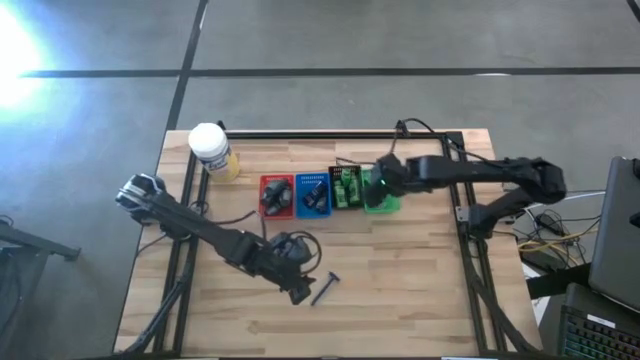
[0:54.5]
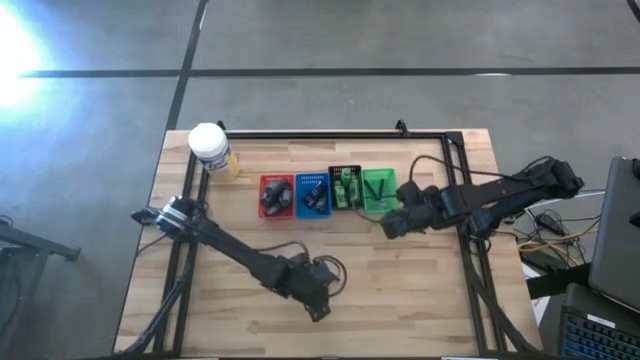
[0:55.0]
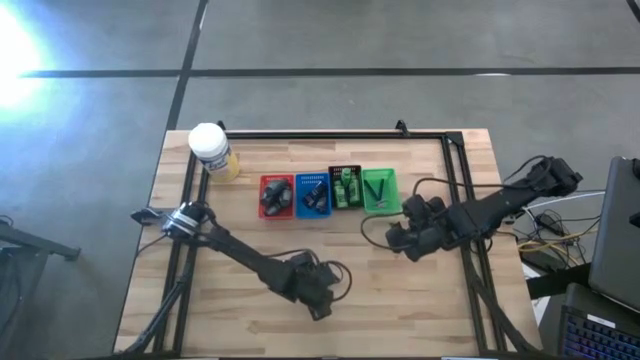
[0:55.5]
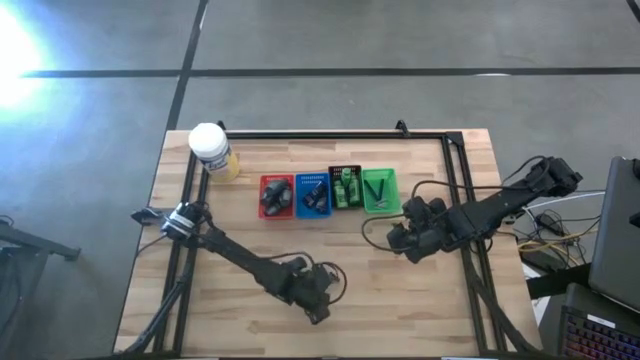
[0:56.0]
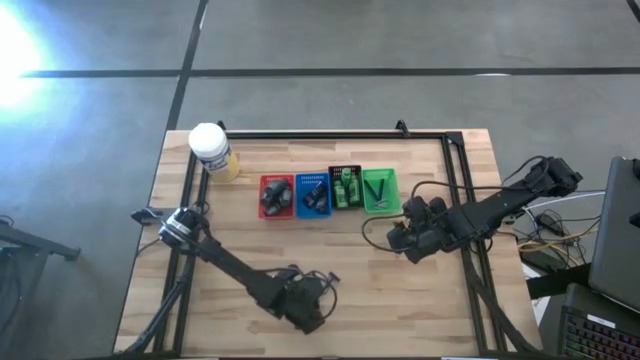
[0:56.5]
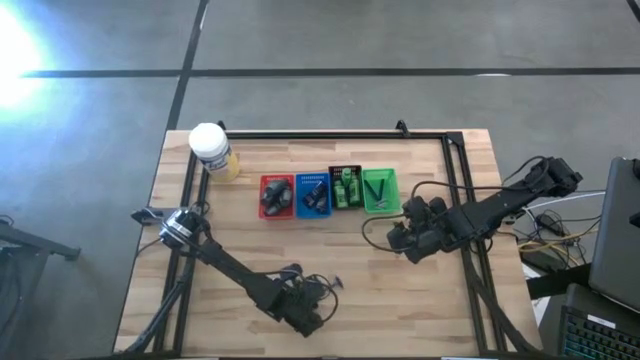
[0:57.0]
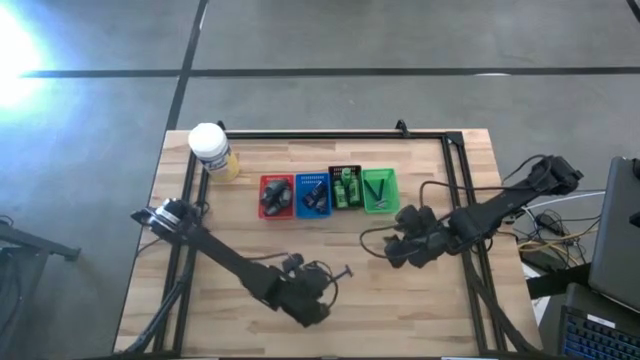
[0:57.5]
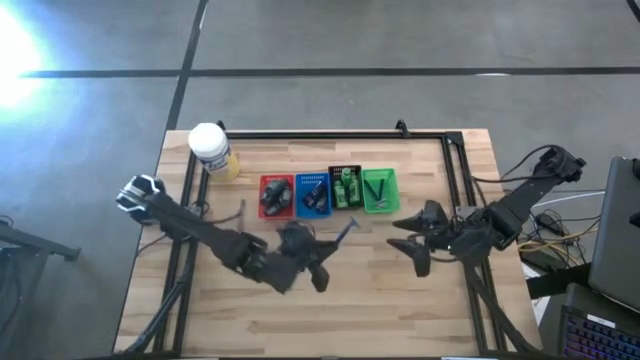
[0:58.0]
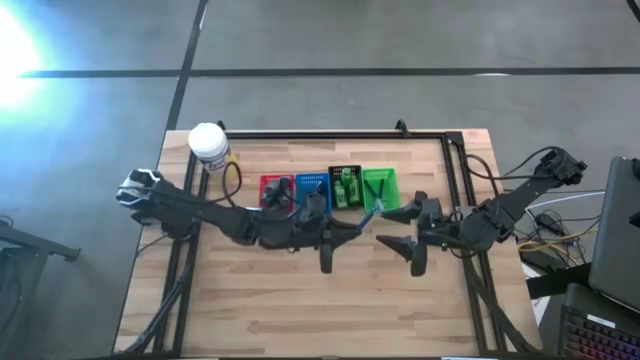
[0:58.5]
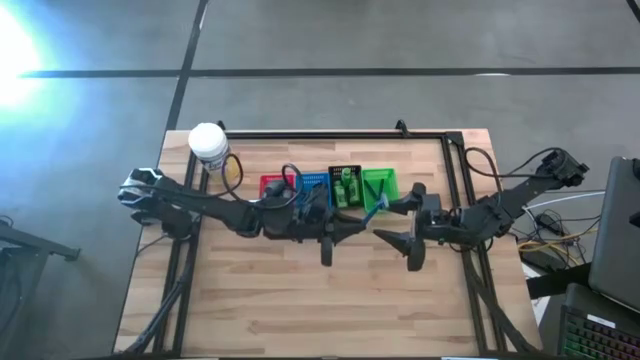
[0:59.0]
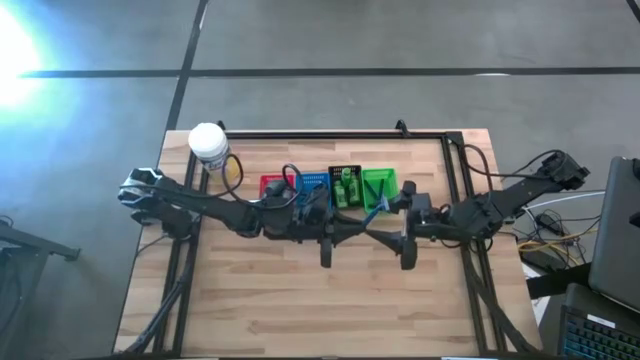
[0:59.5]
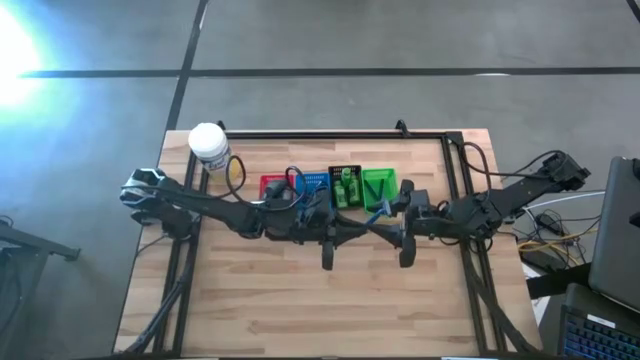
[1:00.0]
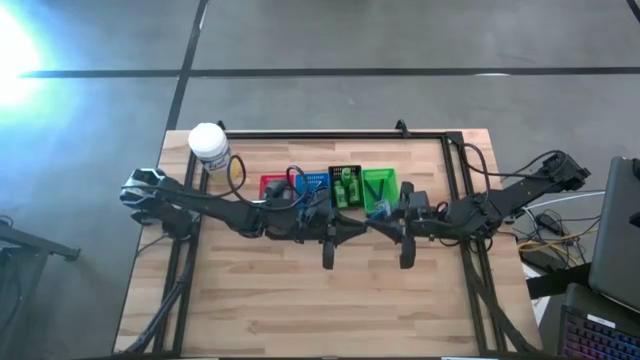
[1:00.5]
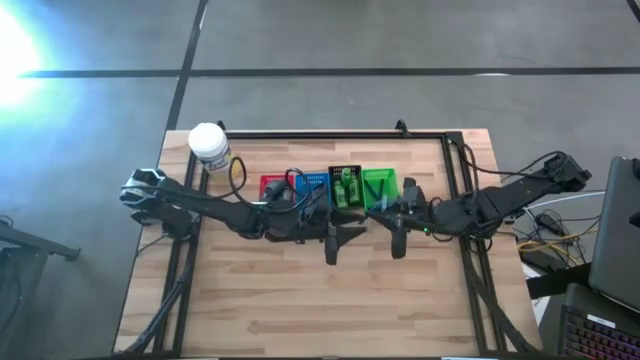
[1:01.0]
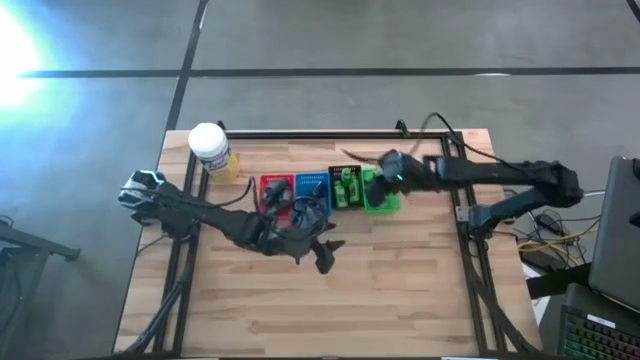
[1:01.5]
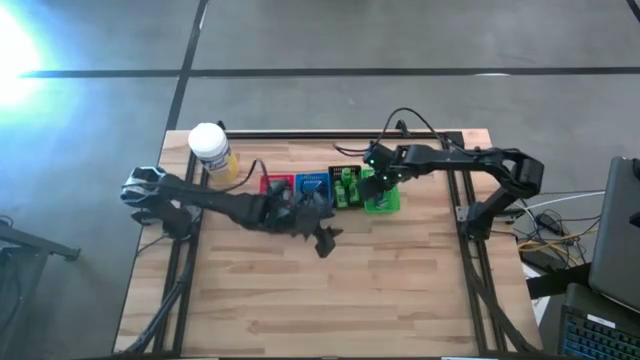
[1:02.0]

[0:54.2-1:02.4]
Task: Pick & Place Travel size toiletries
Put the blue razor into the green bin

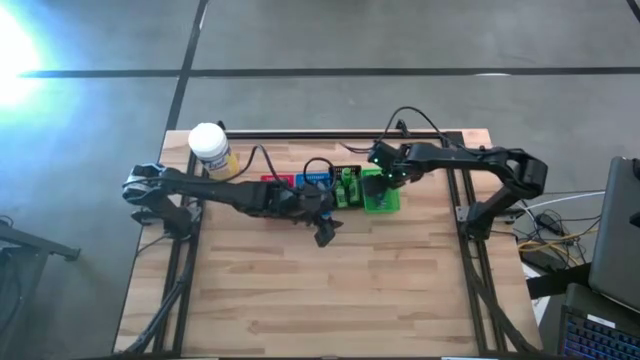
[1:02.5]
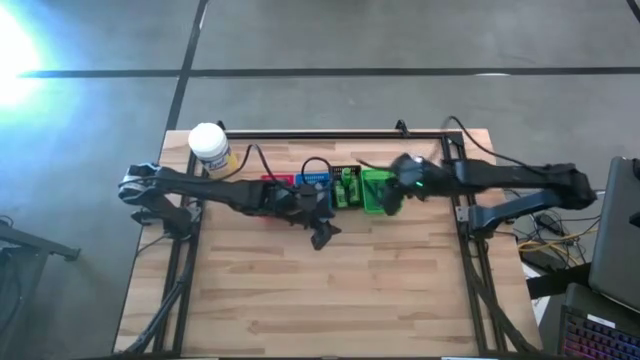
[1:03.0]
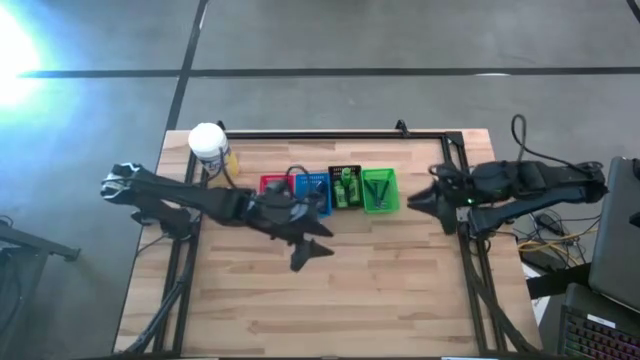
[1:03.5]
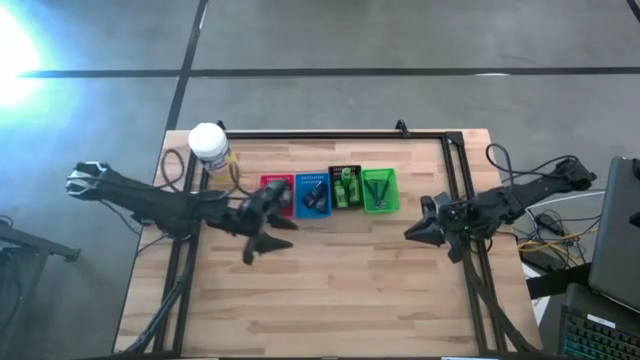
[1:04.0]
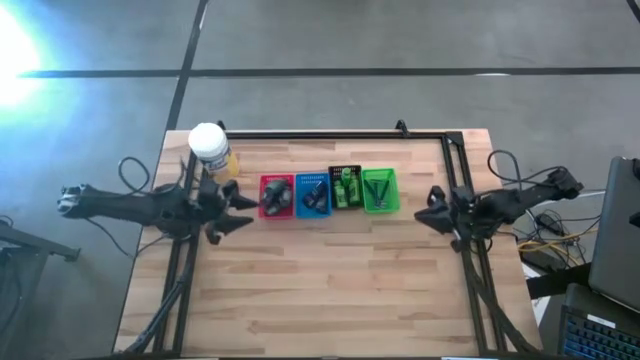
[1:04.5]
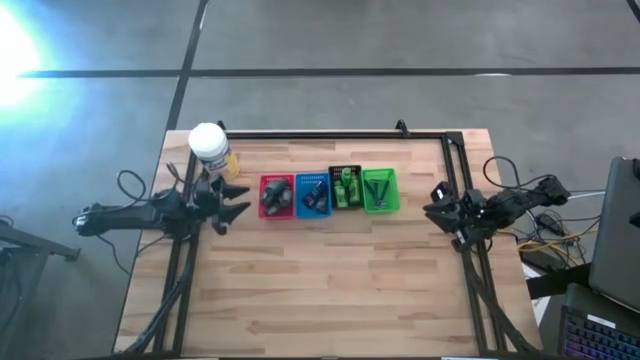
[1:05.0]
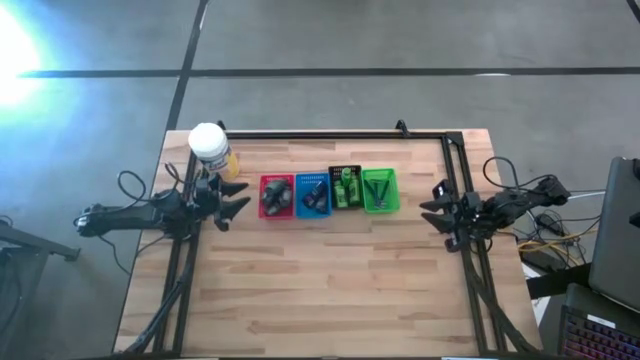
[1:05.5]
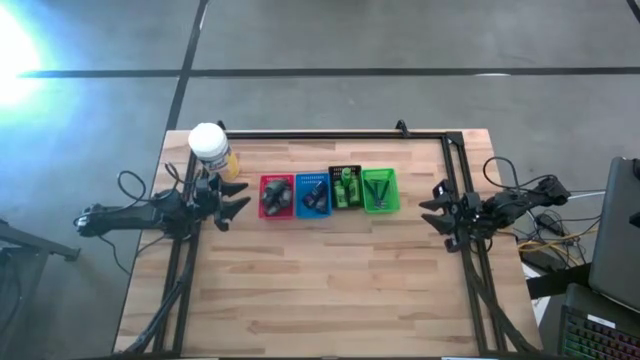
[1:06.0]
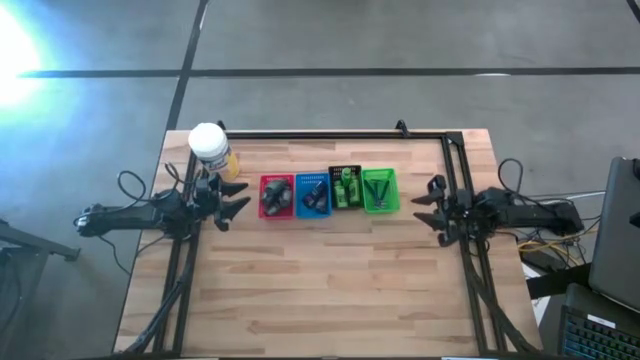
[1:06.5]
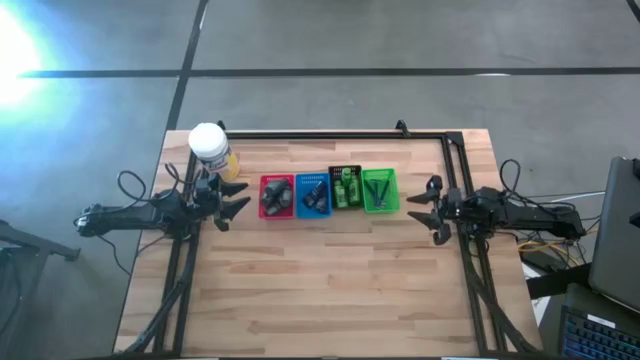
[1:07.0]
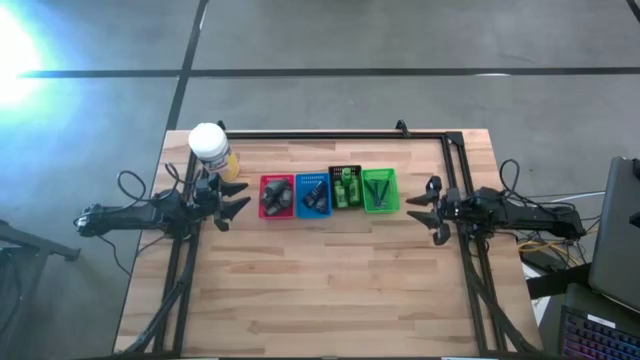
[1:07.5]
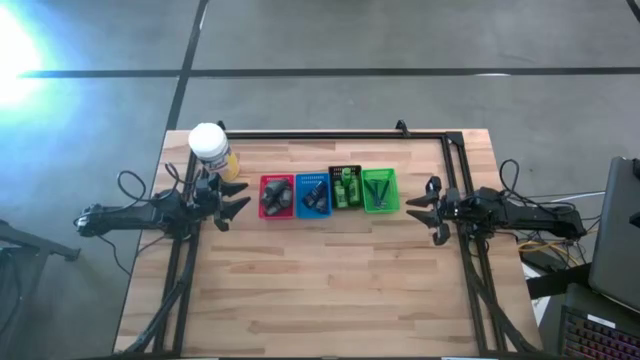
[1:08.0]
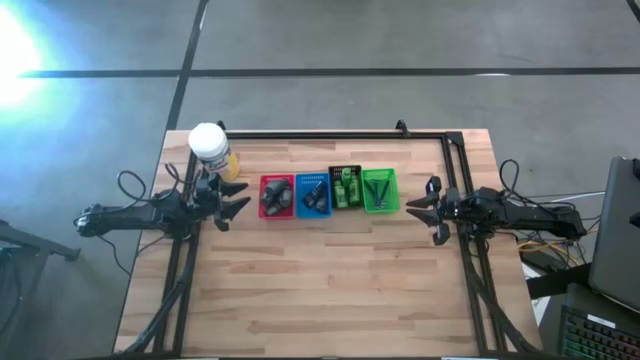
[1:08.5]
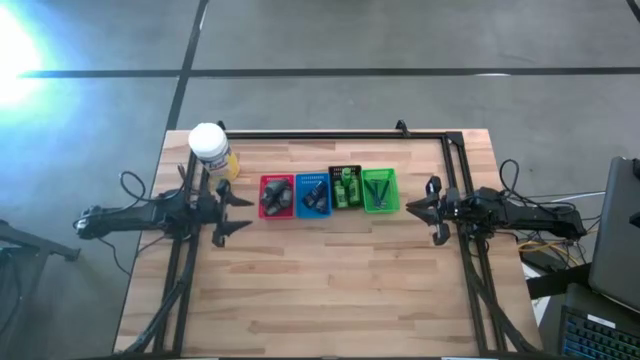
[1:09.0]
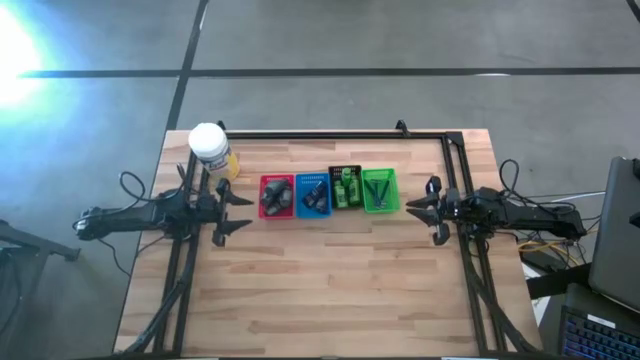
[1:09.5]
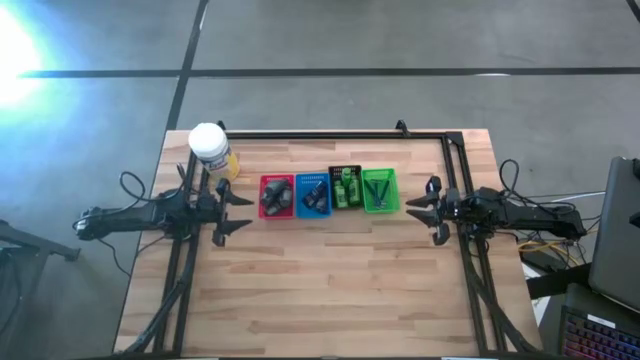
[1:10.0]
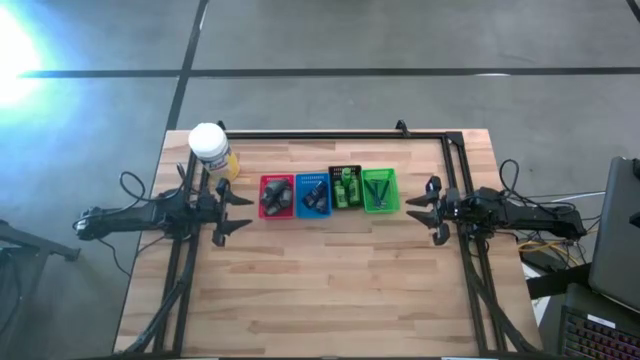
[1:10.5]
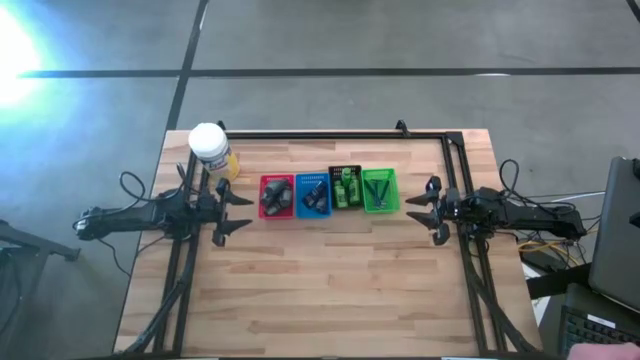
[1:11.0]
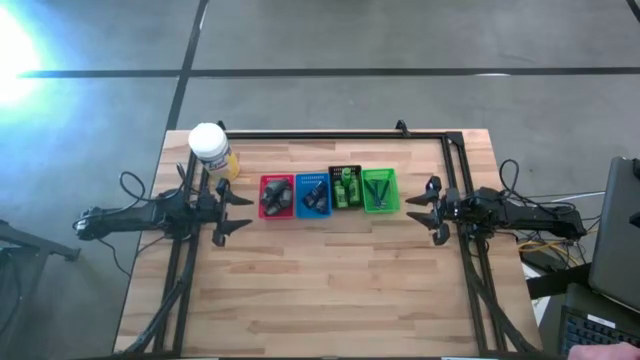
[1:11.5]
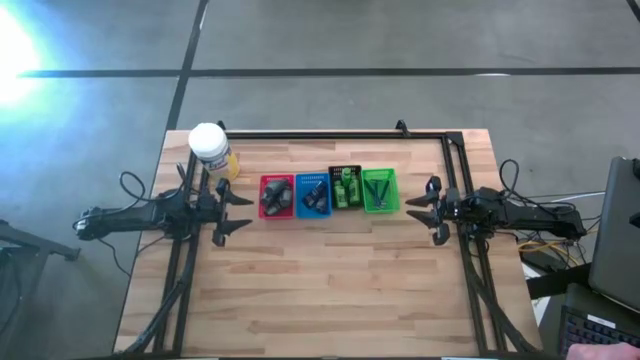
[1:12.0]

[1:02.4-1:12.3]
Return to Home Position

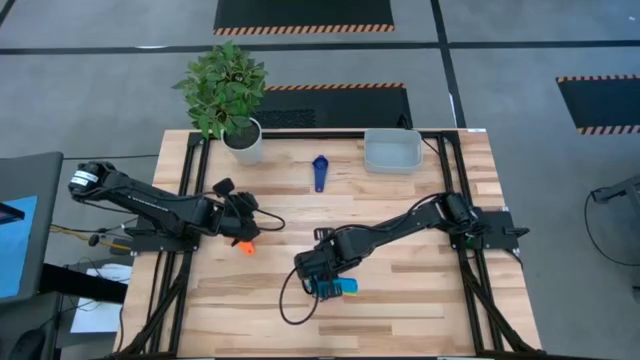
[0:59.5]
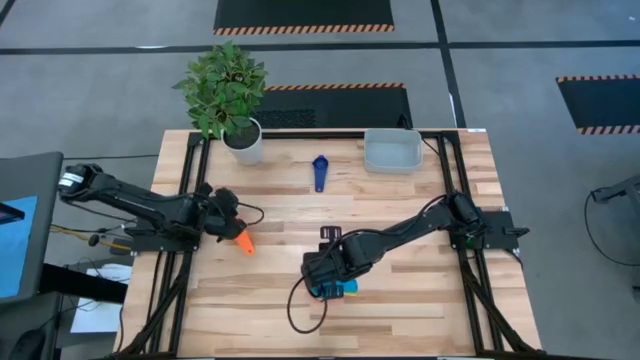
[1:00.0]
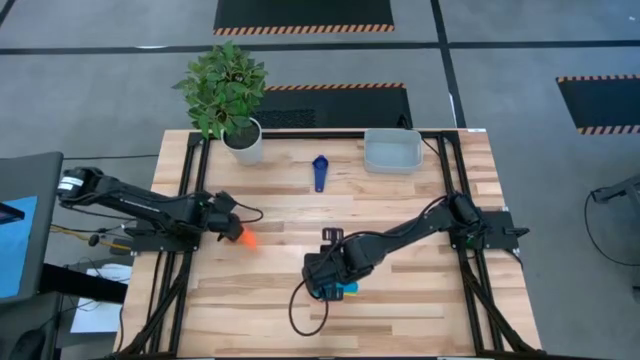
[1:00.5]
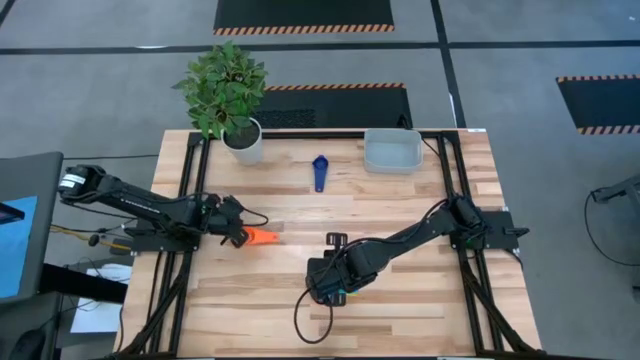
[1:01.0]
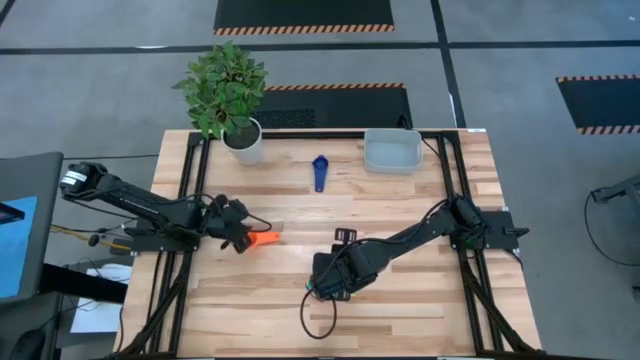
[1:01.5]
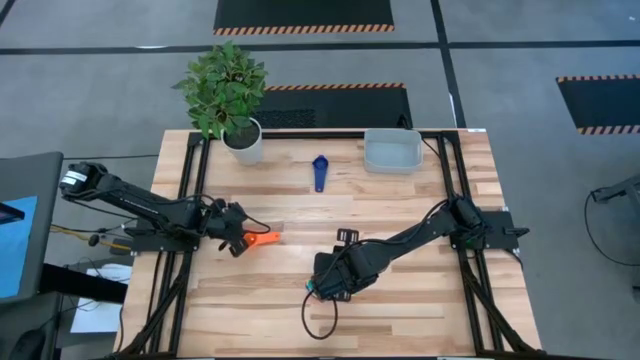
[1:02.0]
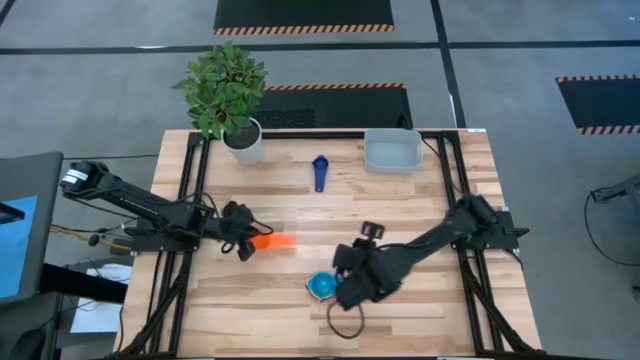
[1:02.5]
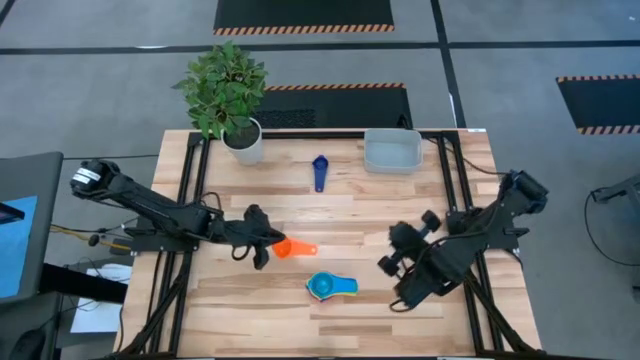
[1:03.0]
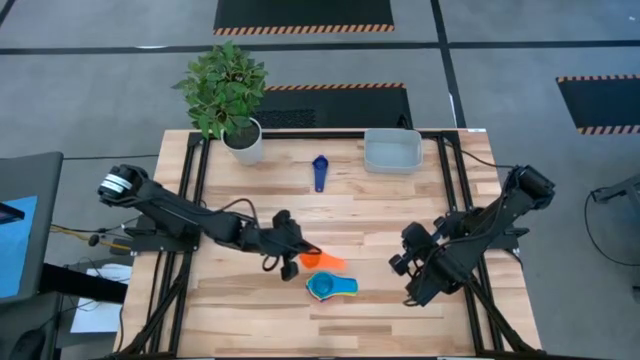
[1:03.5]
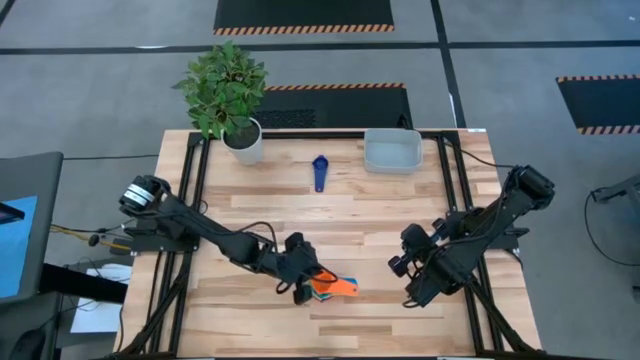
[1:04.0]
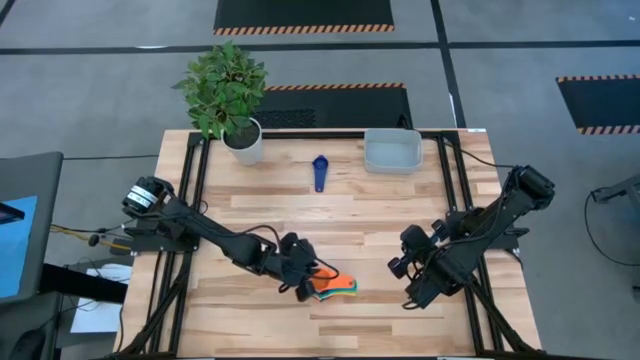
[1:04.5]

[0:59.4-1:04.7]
Task: Nest measuring cups in basket
Stack the orange measuring cup on top of the light blue measuring cup
